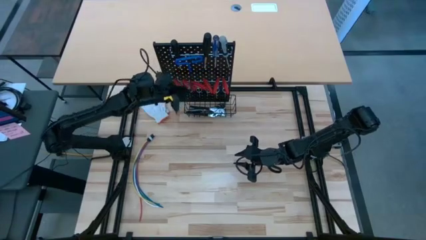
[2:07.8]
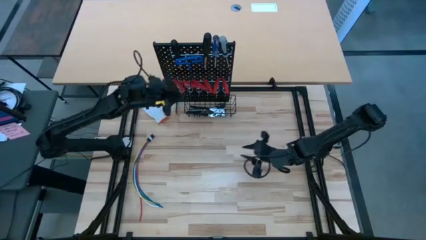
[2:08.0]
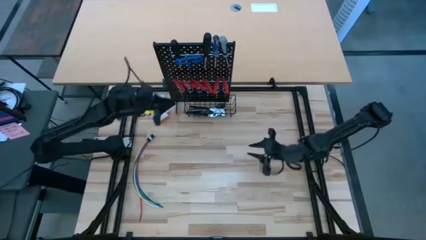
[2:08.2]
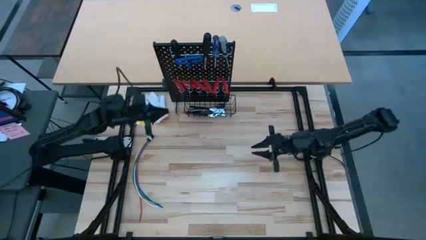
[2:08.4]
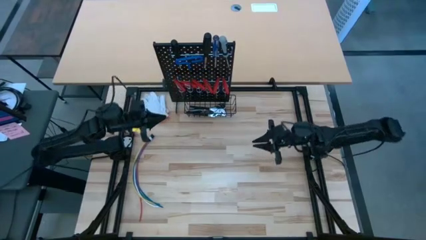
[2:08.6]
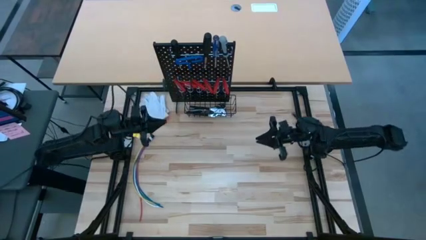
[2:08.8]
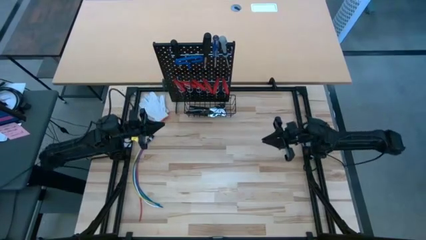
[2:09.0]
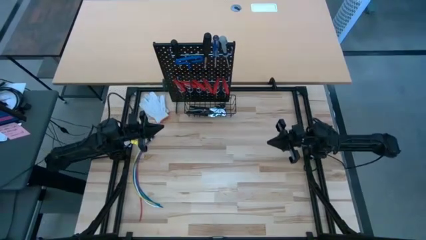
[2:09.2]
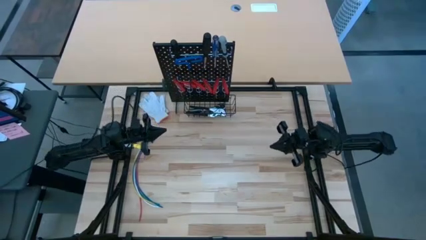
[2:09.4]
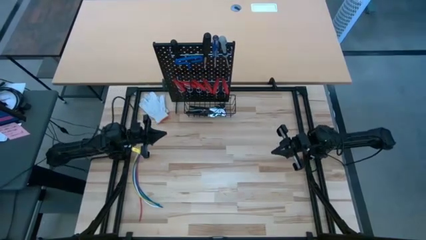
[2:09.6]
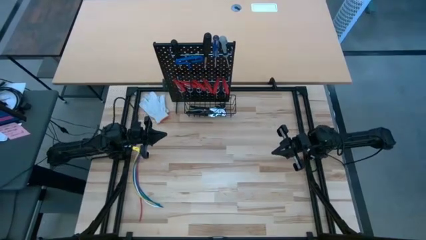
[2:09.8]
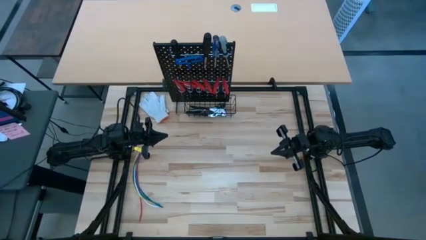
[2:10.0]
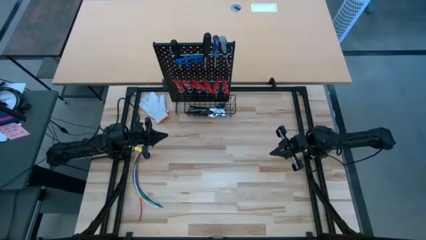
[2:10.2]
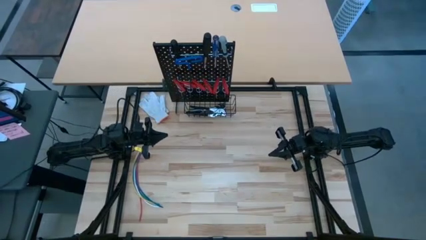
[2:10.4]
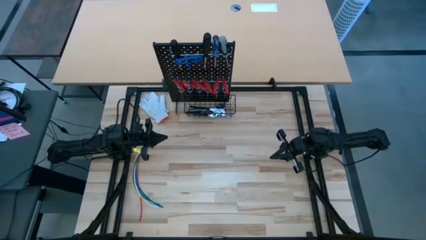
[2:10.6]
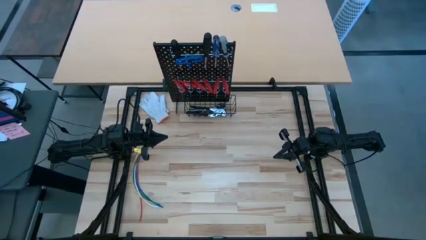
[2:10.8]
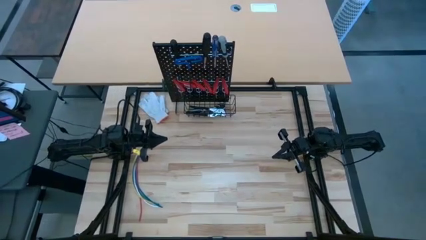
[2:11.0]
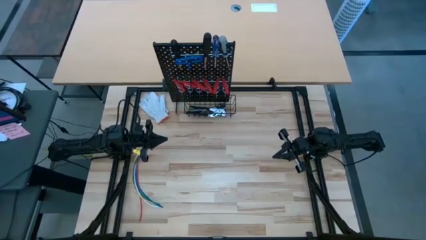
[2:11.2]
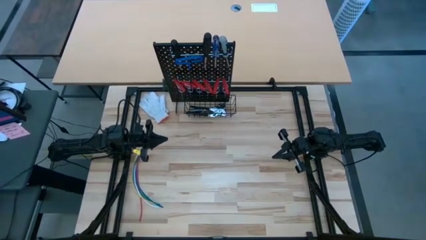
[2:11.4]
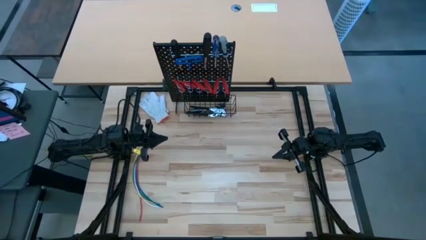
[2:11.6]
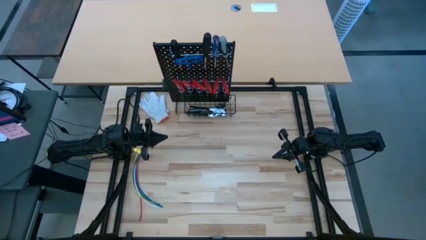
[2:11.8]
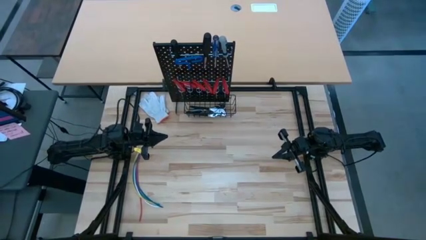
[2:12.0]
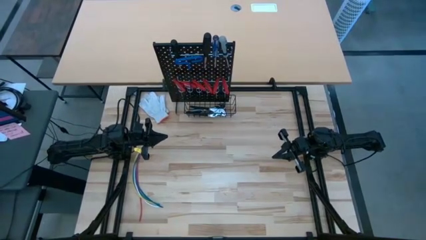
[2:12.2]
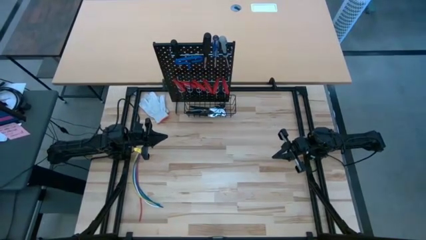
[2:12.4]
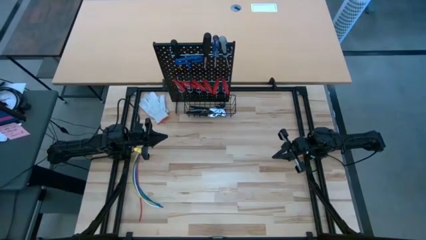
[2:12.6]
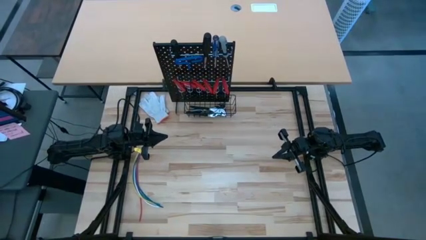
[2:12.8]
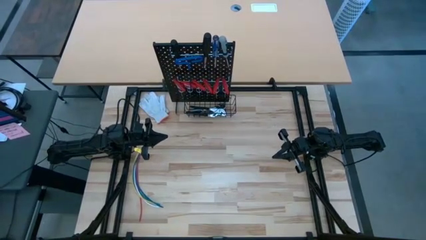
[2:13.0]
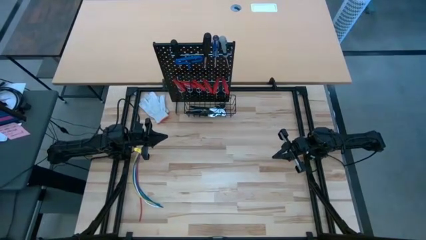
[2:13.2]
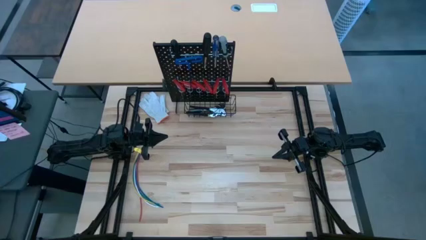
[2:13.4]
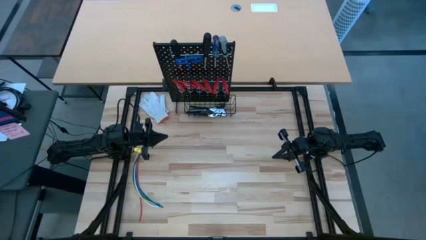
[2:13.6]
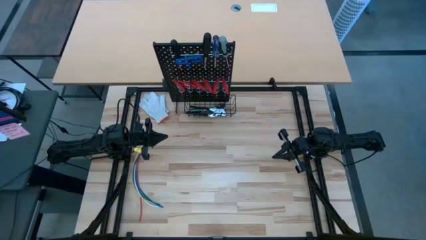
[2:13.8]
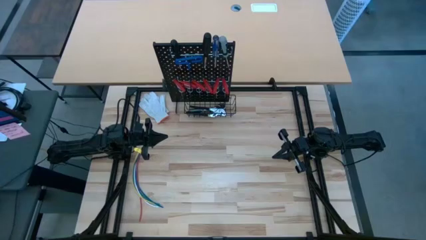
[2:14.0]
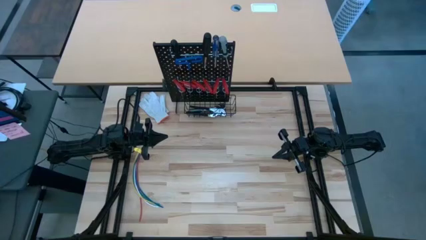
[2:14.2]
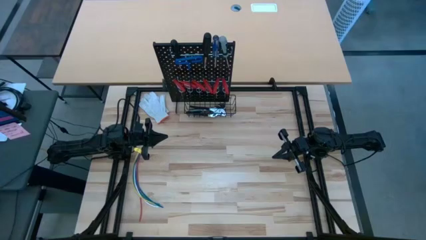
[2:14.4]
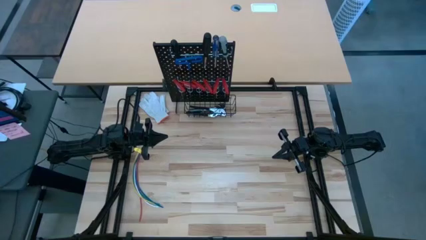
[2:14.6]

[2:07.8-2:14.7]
Task: Hang tools onto peg board
Return to Home Position

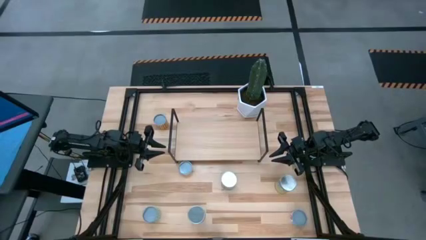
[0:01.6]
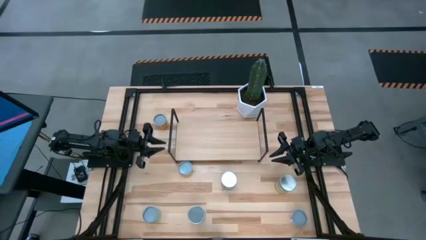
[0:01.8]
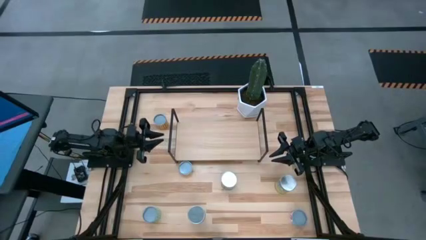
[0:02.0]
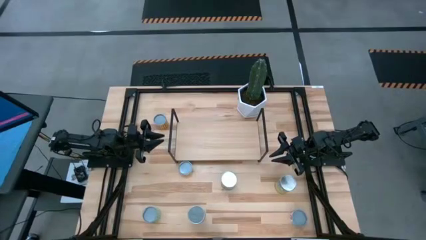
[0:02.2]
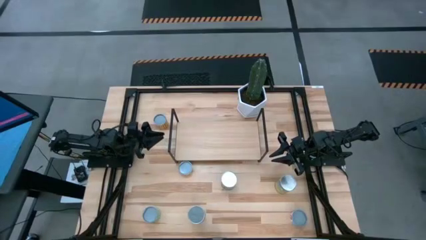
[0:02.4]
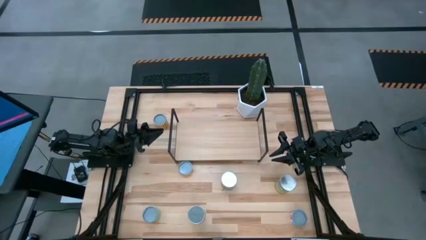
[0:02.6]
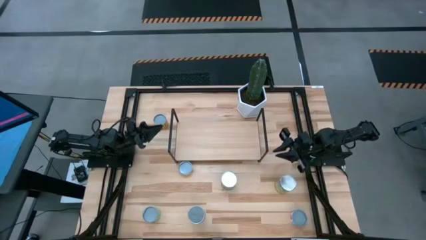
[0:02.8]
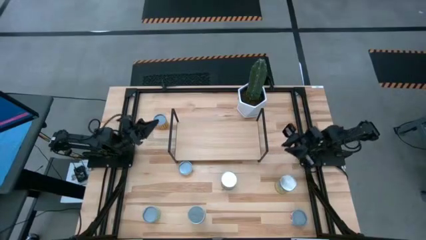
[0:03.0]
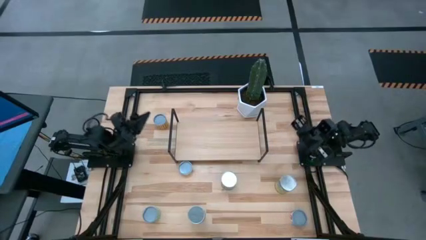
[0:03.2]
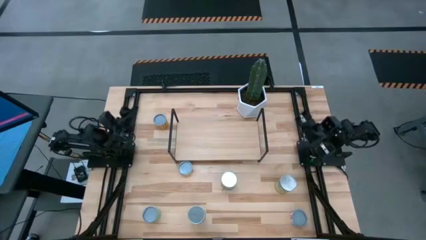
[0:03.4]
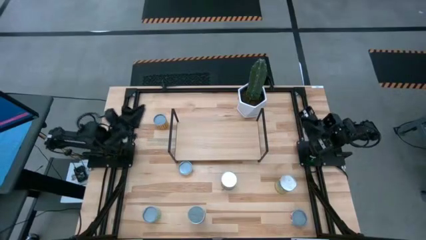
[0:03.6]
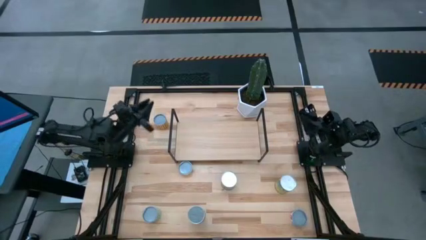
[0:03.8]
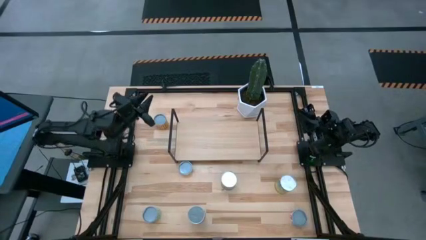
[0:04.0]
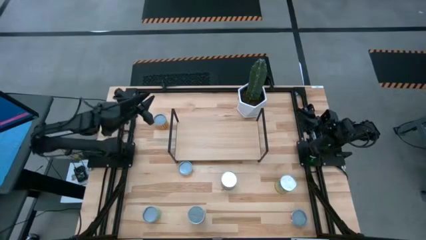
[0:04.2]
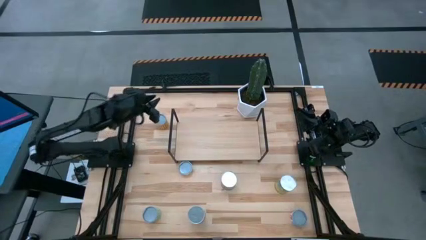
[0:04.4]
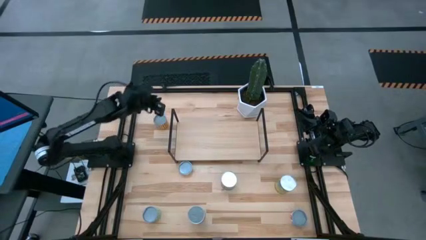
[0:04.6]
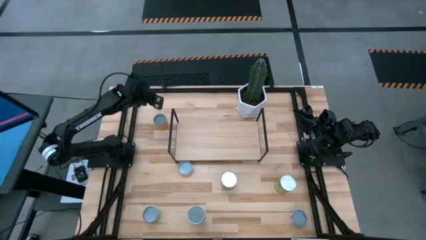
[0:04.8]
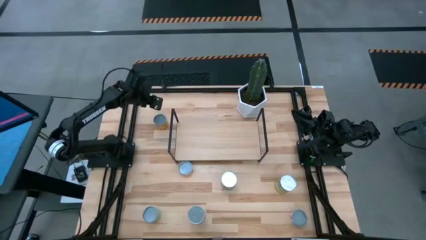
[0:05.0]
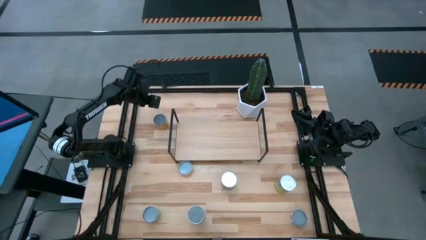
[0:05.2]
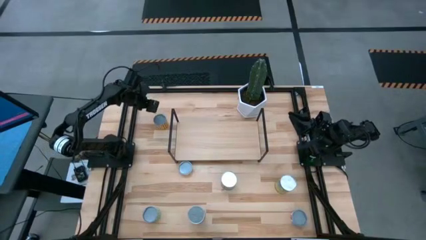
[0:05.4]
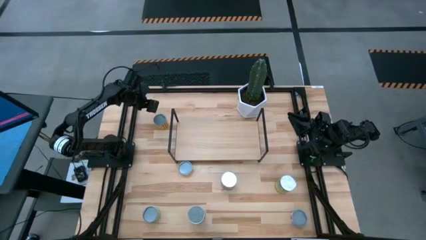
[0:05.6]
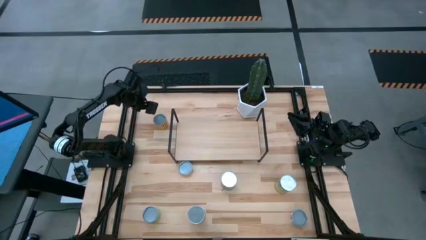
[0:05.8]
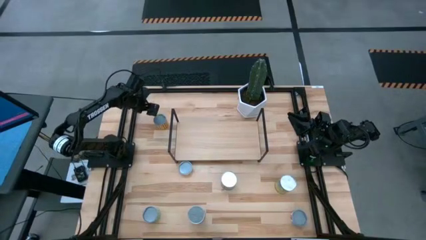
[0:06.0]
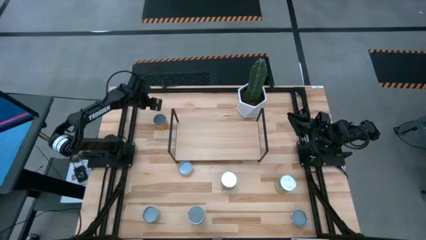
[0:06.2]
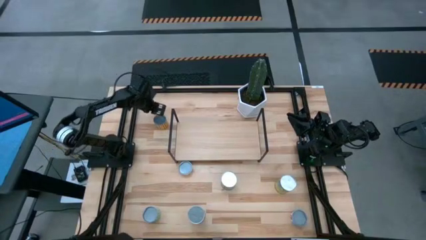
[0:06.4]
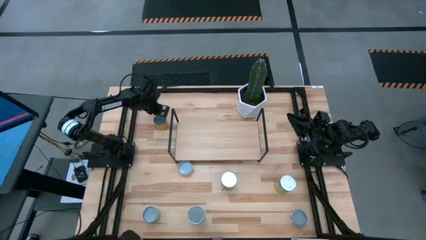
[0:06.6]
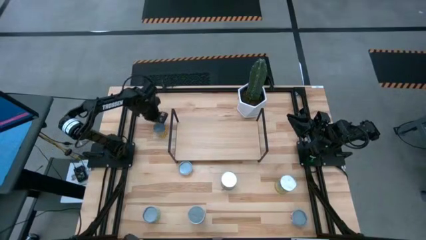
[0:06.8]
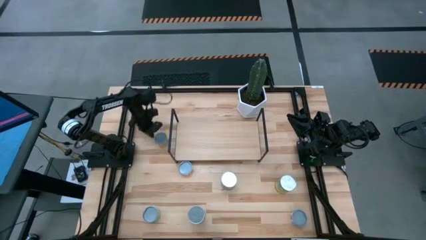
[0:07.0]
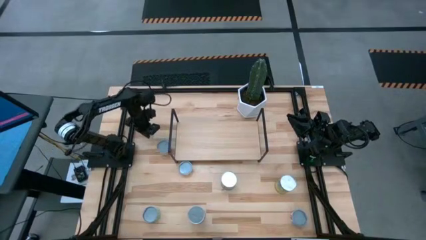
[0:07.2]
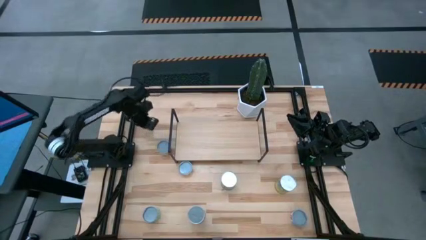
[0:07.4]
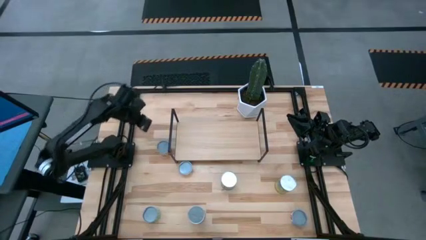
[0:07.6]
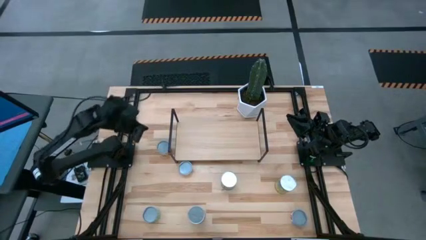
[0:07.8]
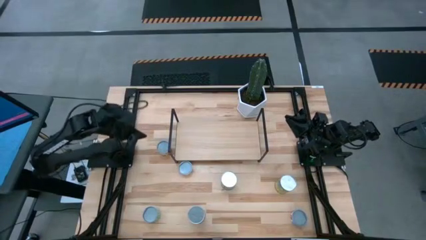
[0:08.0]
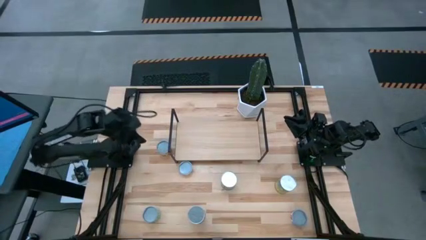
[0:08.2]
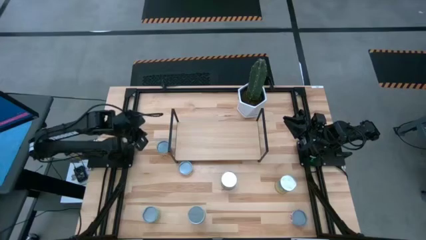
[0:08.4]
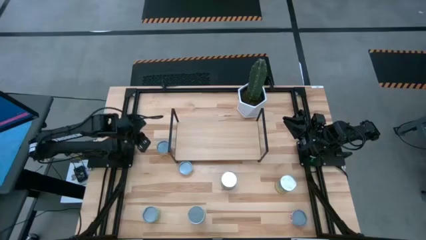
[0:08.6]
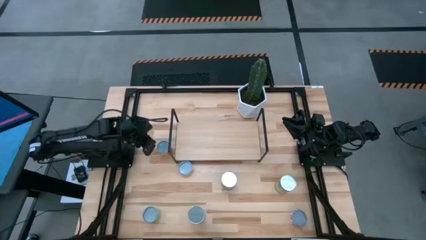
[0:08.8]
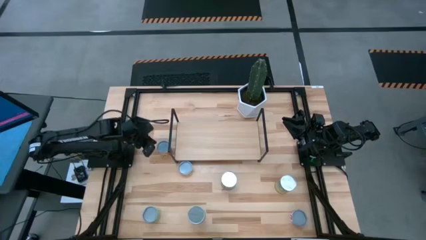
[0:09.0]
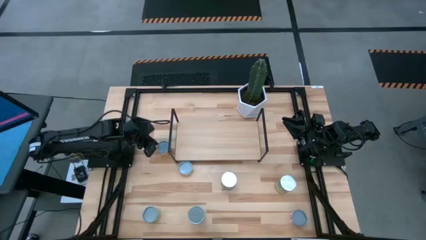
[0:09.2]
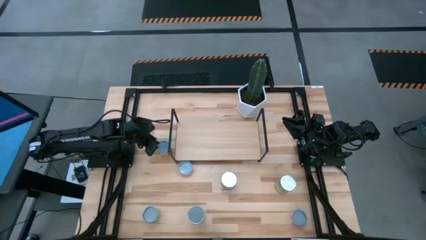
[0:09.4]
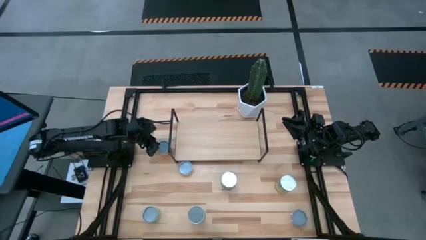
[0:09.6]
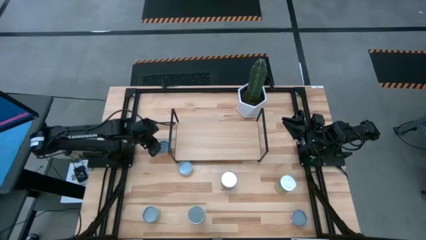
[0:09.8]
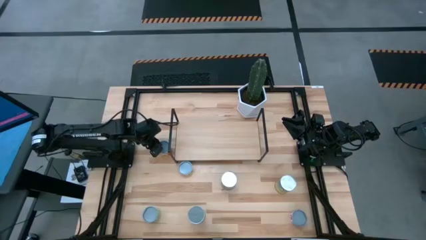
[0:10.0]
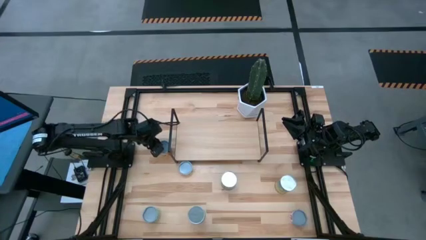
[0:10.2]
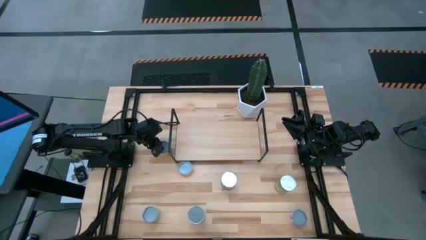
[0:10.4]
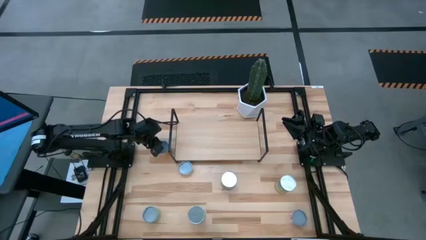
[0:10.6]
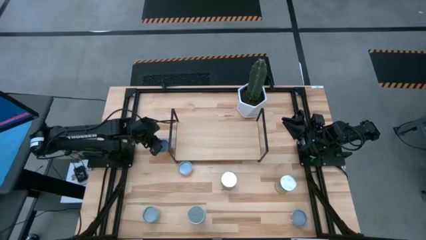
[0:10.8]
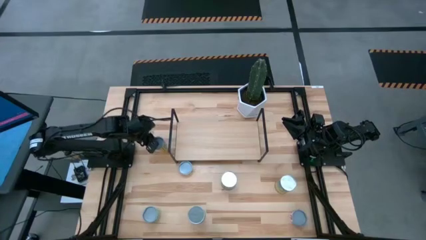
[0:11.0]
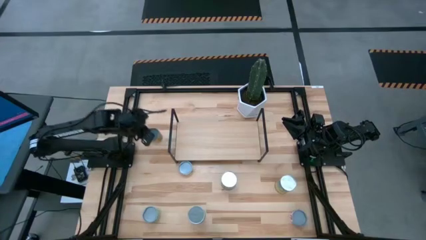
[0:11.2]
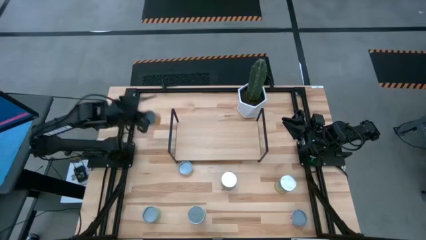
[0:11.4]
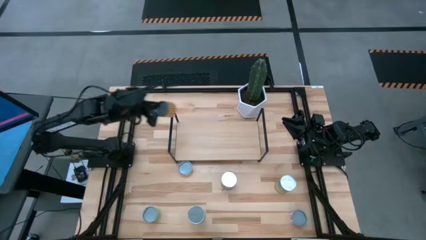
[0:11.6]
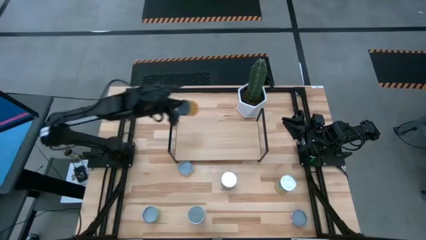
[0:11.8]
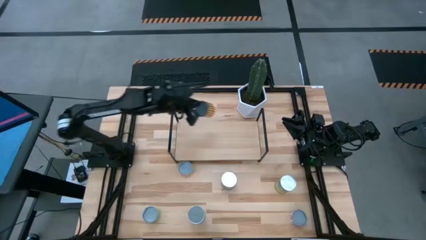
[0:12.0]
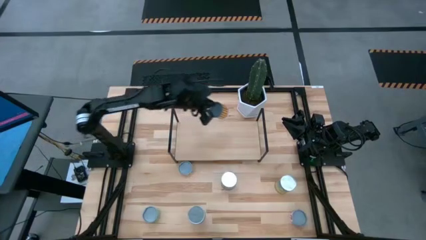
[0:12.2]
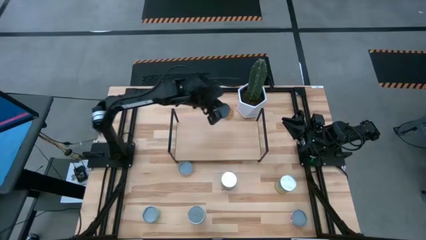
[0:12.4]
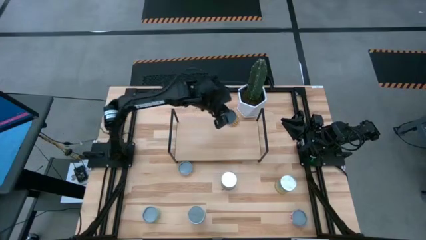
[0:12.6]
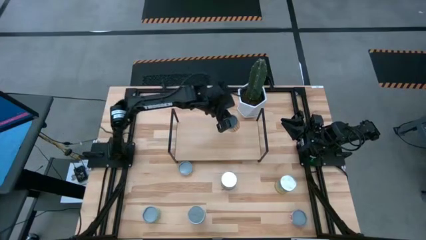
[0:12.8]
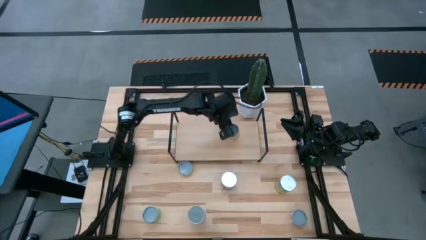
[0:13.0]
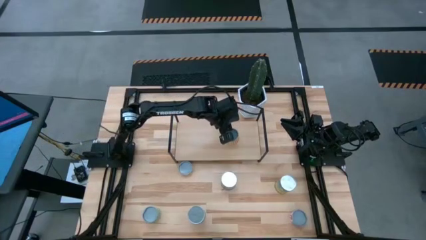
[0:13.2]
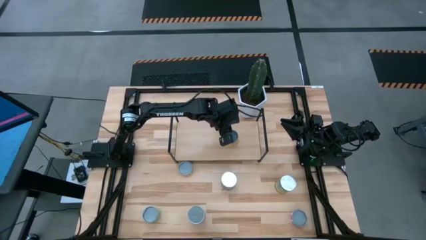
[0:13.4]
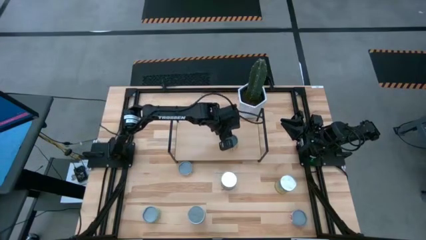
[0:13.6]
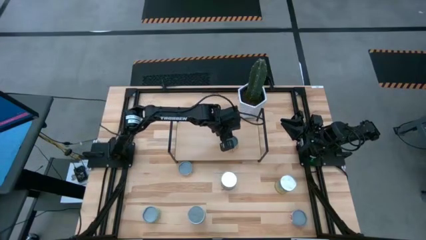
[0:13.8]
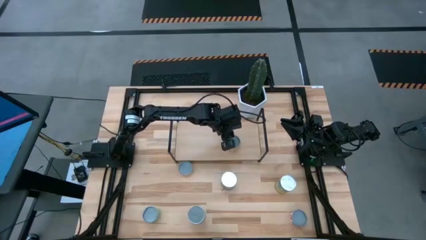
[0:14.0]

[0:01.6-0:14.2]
Task: Pick and place cans onto a shelf
Put the small canned black beans on the shelf
